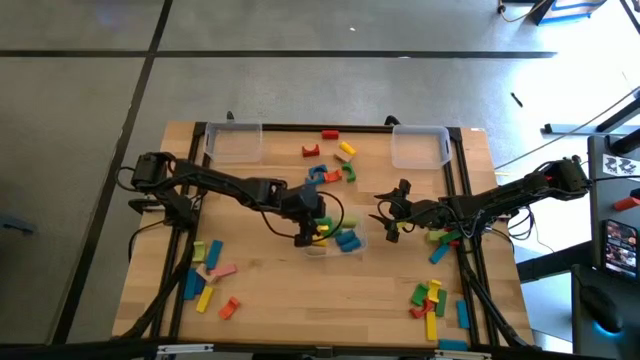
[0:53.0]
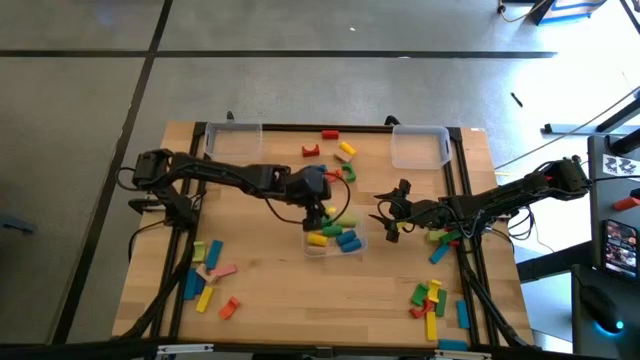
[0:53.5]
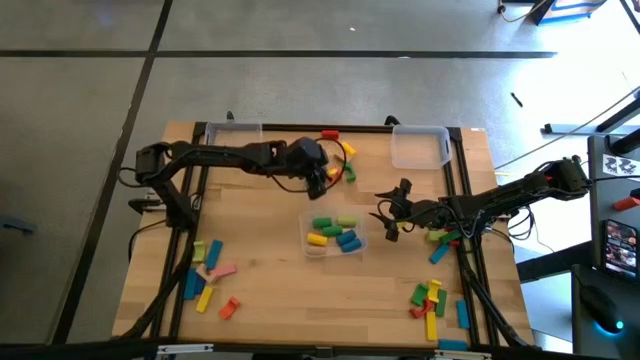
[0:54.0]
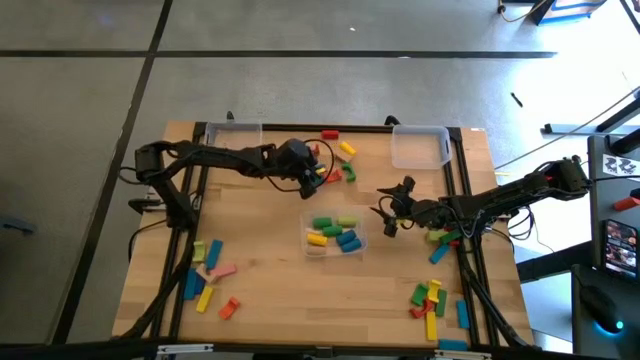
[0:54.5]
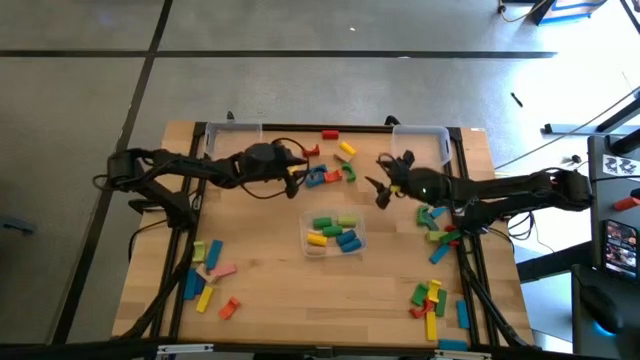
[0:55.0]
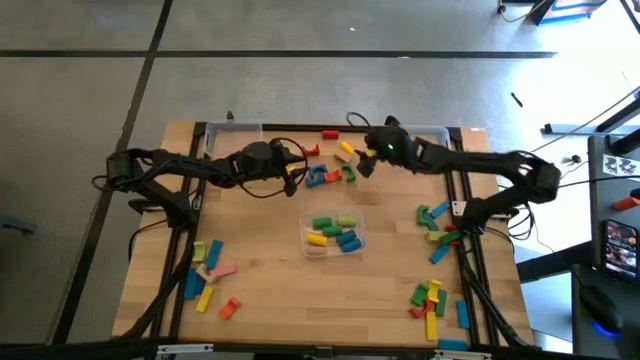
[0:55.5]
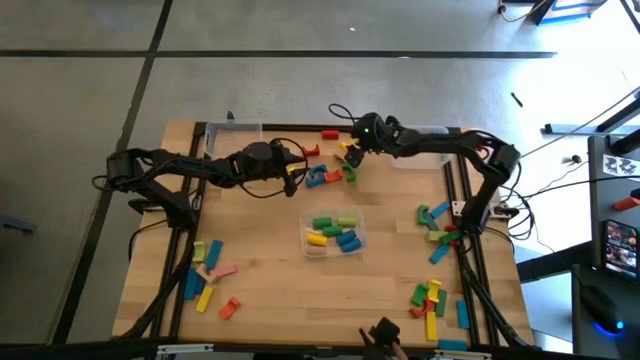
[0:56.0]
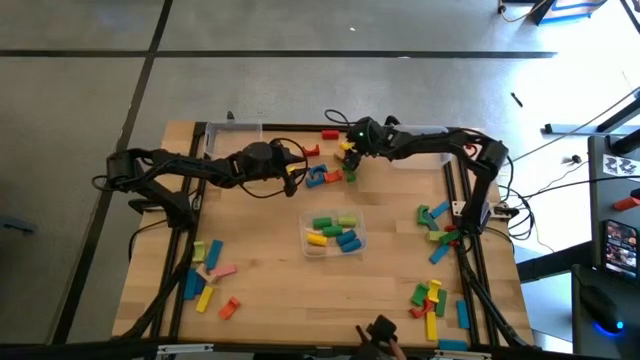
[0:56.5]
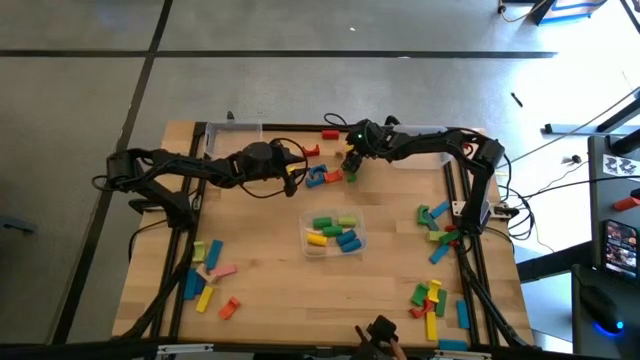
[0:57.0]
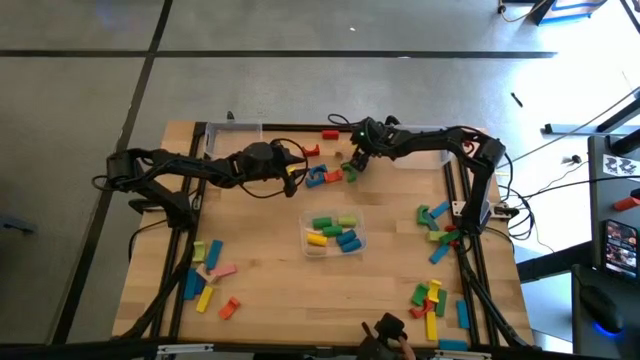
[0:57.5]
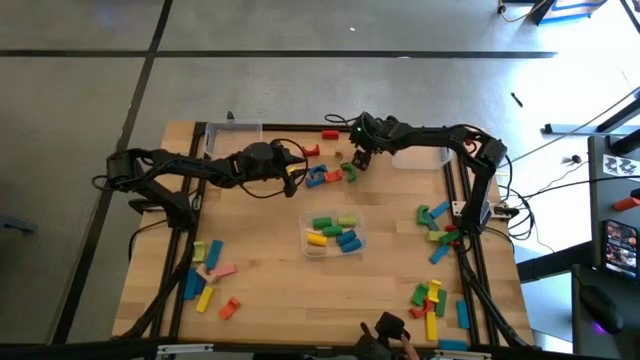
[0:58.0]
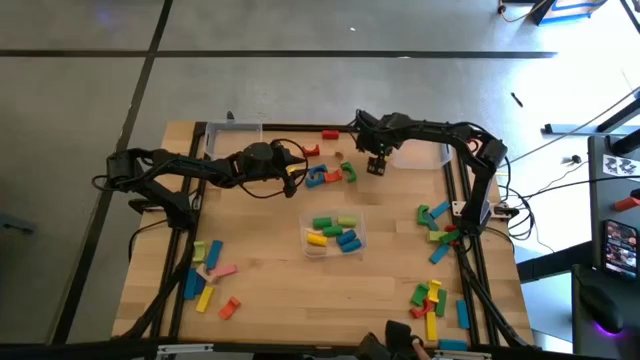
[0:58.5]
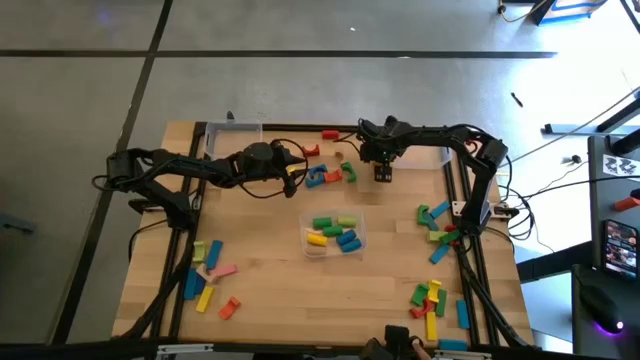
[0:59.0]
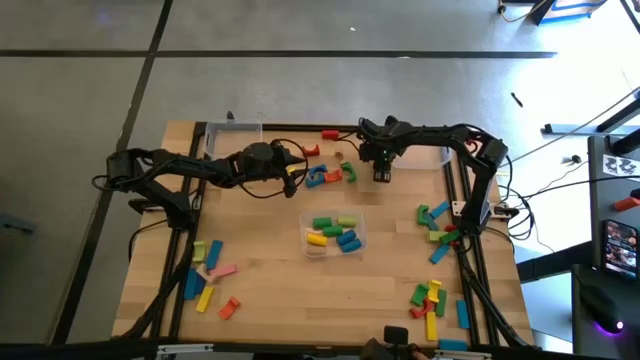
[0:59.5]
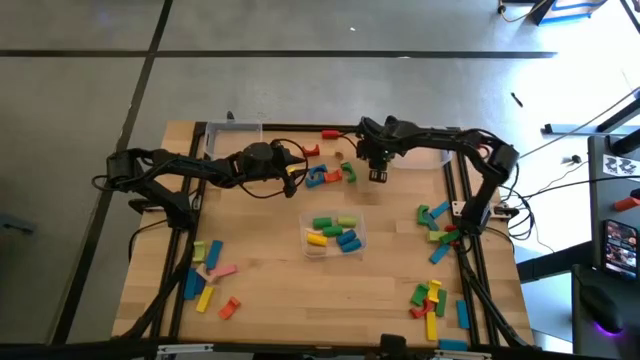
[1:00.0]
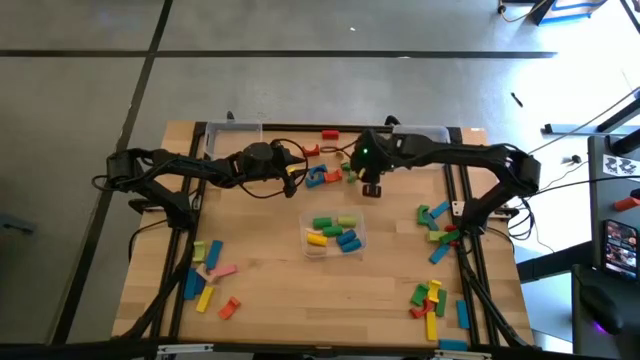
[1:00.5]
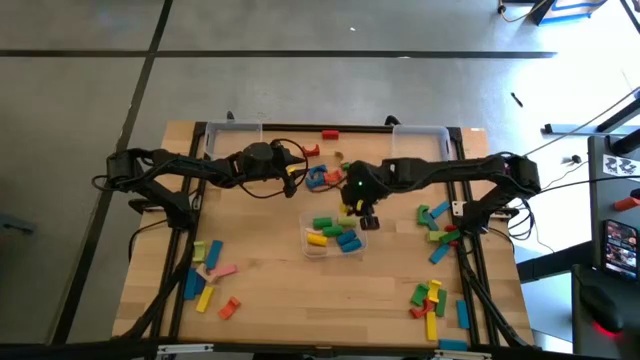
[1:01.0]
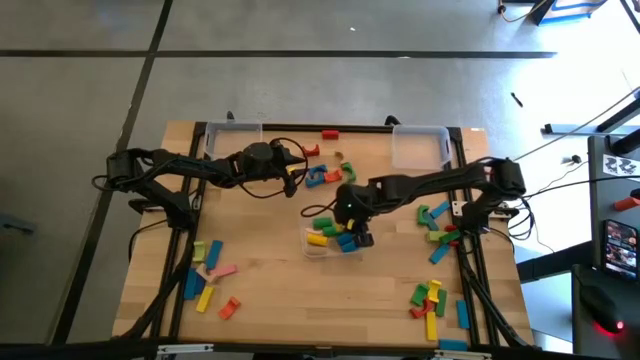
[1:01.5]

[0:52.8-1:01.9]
Task: Sort blocks by size
Put the yellow cylindrical block into the bottom transparent bin

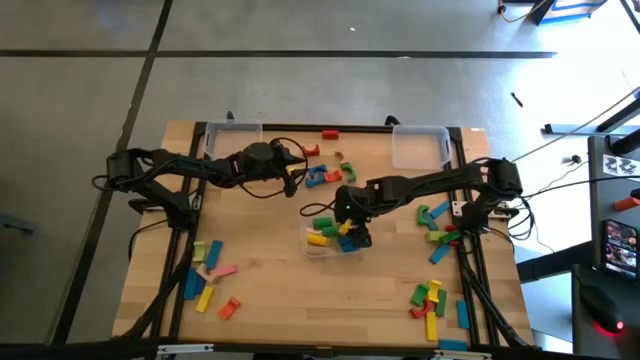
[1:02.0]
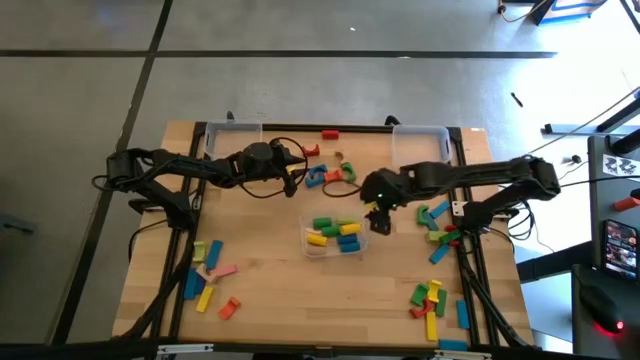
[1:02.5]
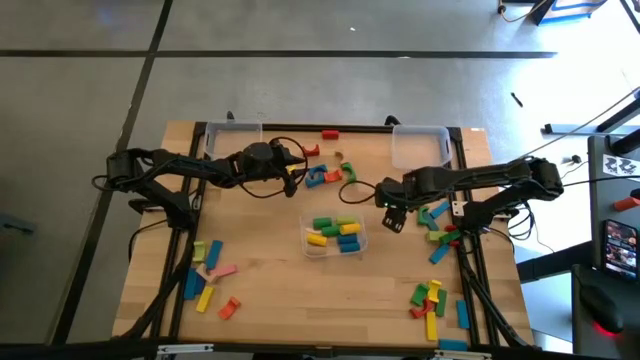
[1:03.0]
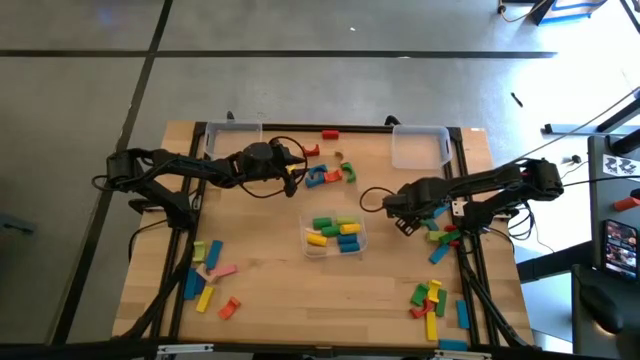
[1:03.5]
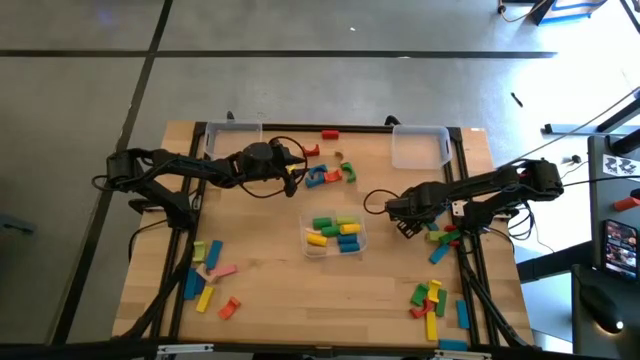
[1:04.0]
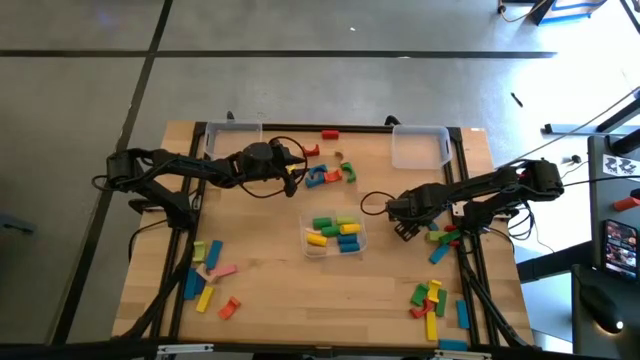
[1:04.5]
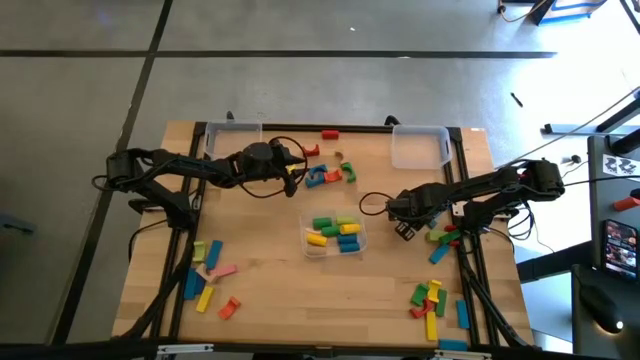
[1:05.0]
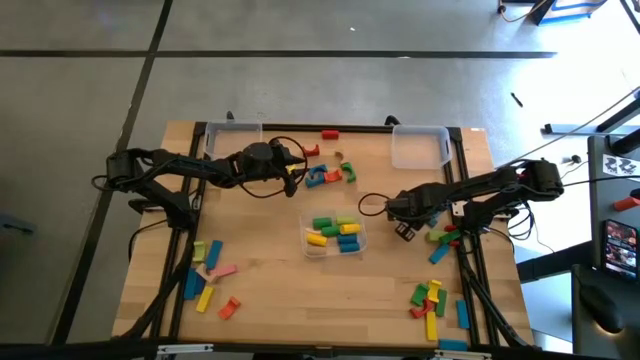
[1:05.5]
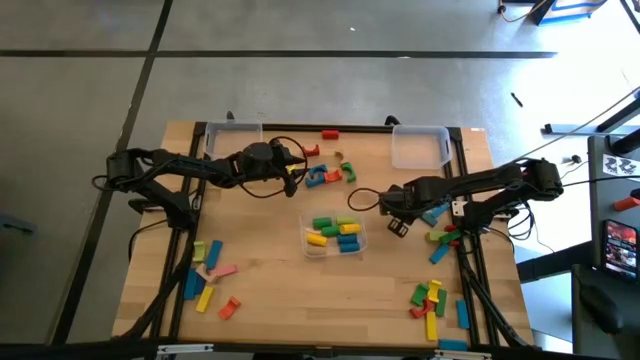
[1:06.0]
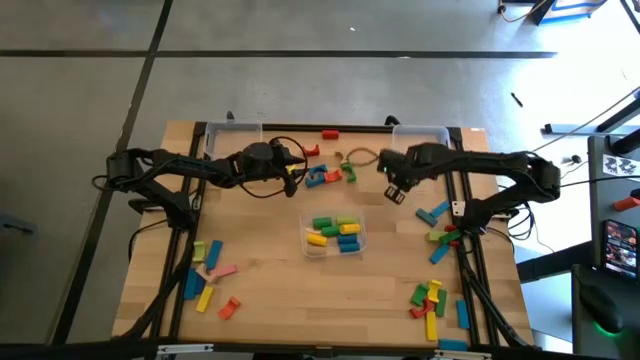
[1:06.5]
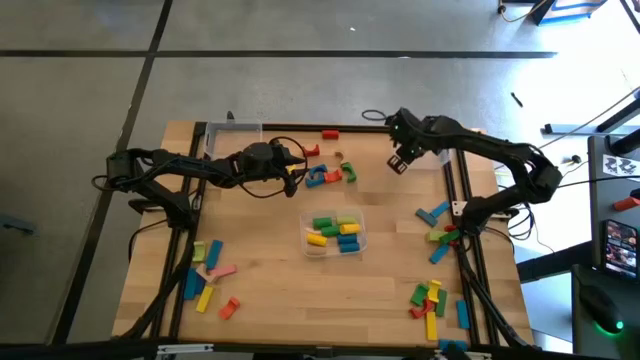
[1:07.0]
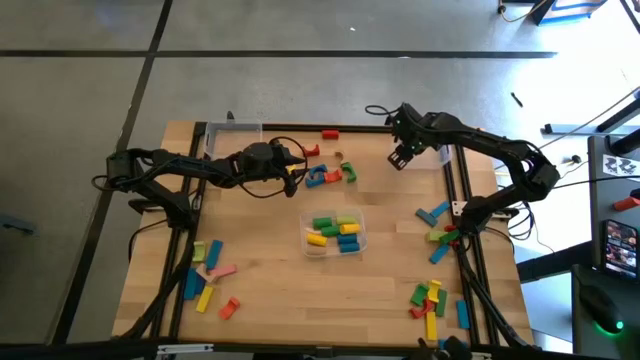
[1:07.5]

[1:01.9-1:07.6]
Put the green arch block into the top right transparent bin

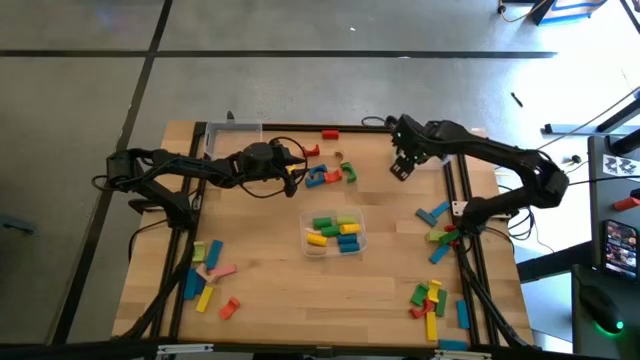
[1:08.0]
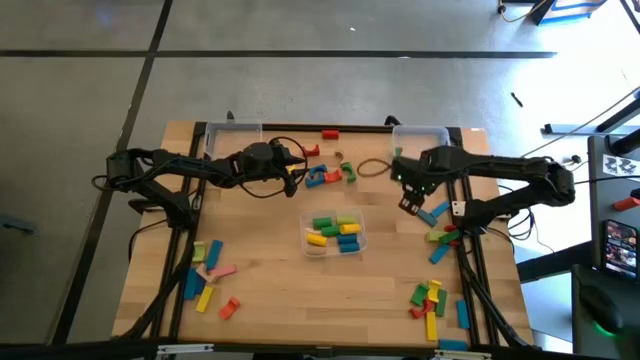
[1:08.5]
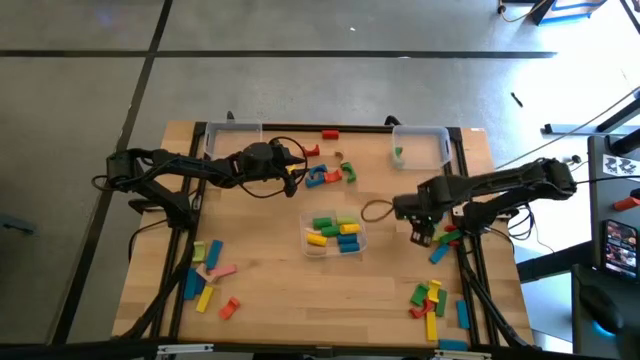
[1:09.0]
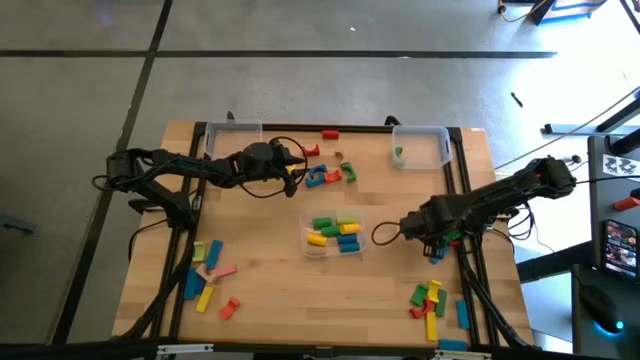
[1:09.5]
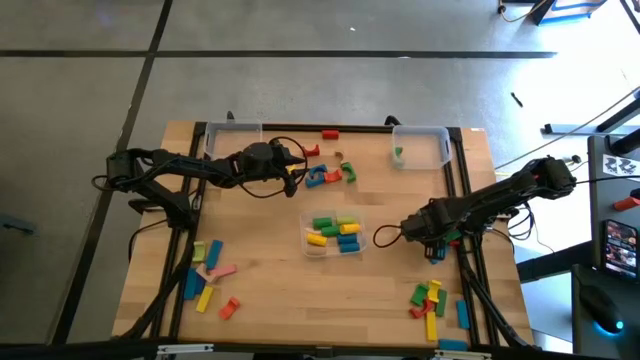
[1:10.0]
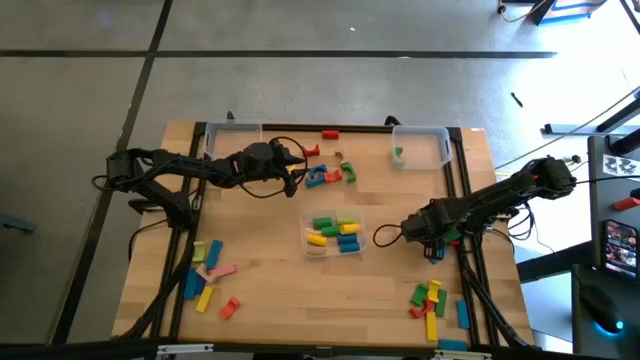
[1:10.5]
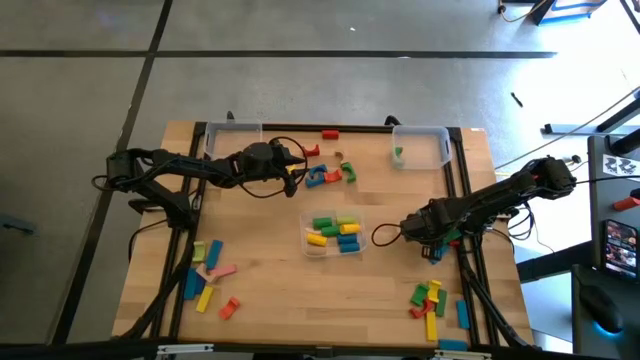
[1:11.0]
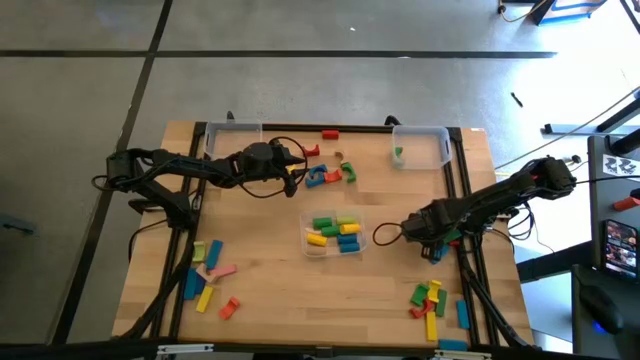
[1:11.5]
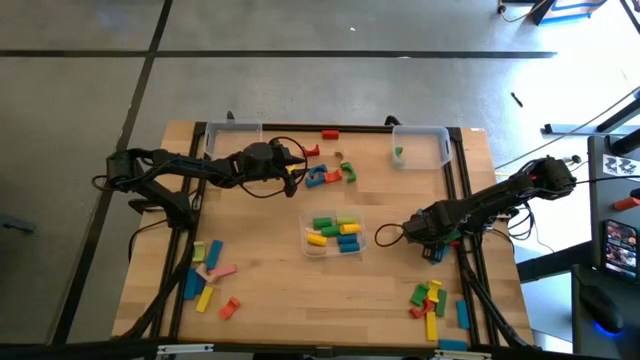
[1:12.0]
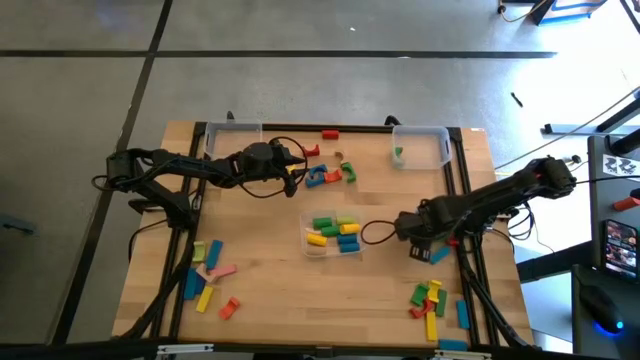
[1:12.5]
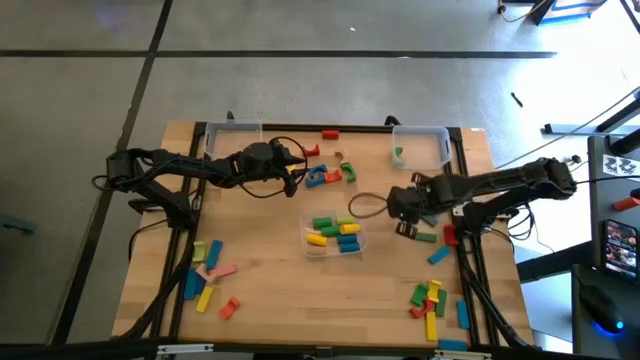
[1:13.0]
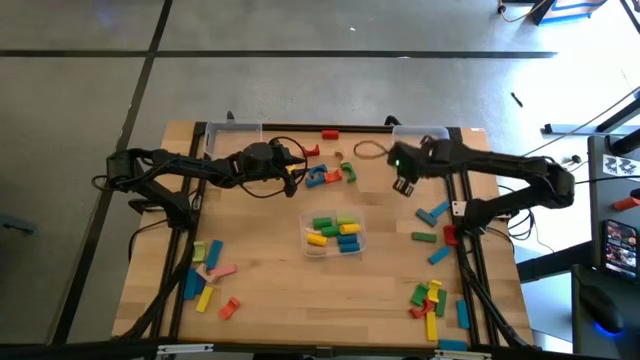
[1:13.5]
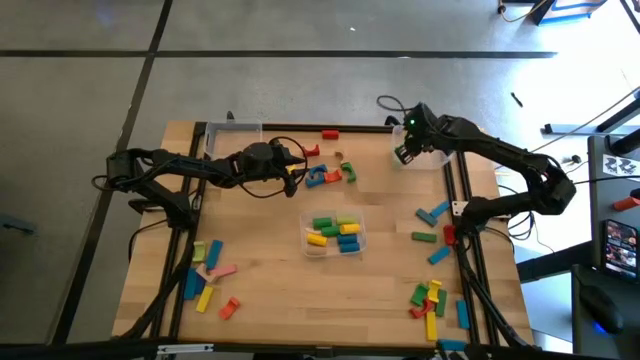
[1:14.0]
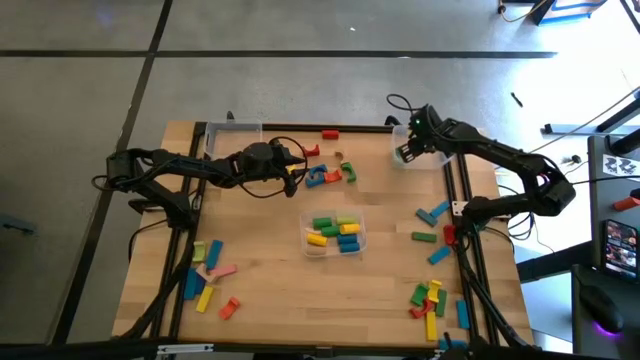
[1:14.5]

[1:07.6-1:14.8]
Put the light green arch block into the top right transparent bin

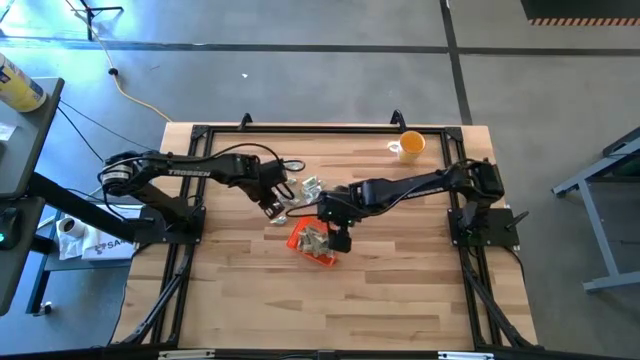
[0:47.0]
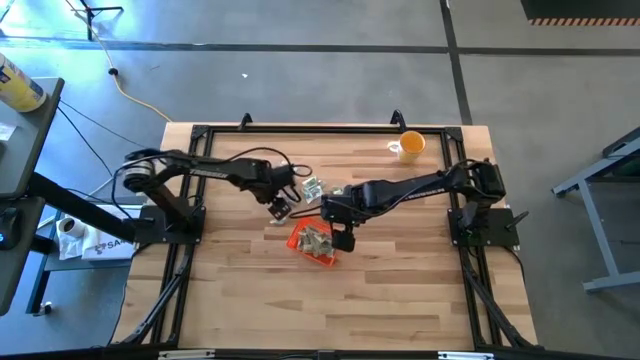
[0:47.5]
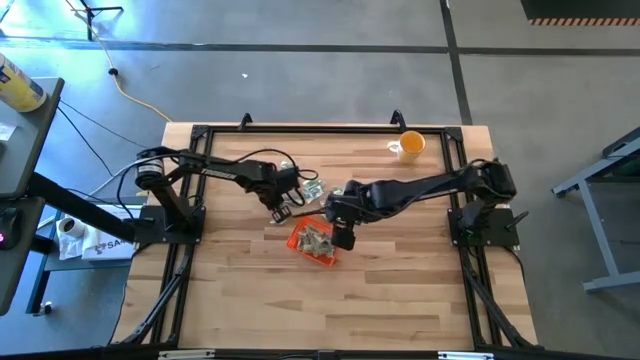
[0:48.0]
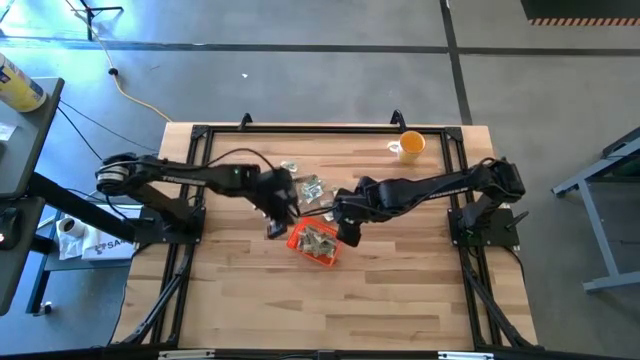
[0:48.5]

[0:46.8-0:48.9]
Task: Pick and place Stevia / Truvia into bins
Put the stevia packet into the orange bin
